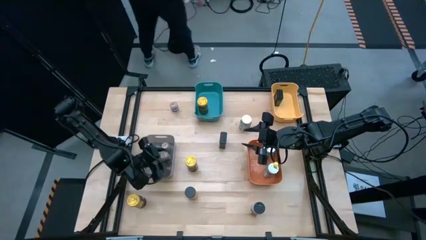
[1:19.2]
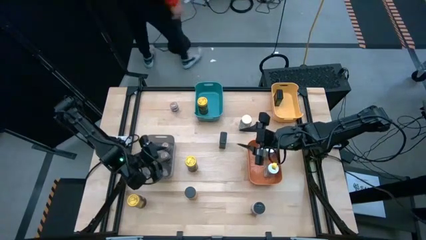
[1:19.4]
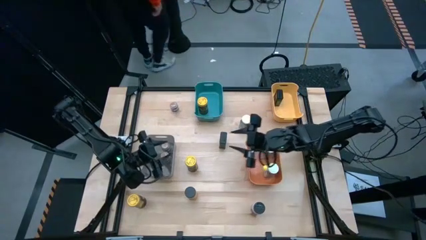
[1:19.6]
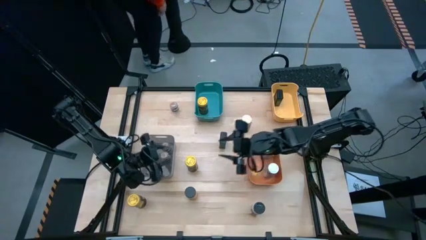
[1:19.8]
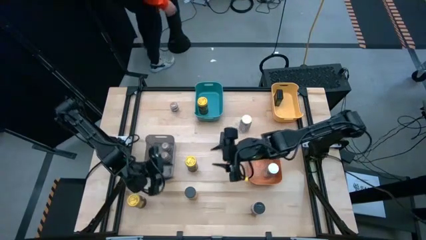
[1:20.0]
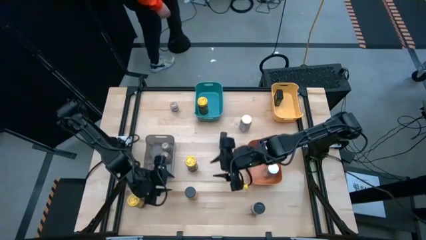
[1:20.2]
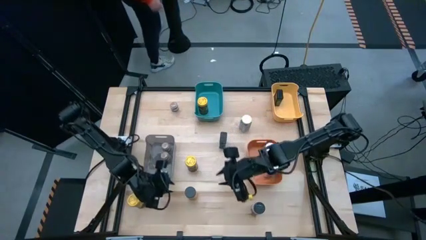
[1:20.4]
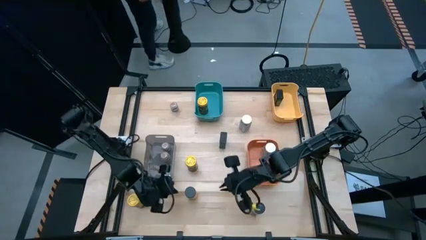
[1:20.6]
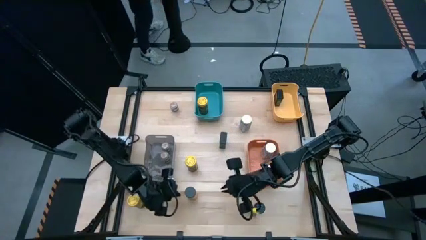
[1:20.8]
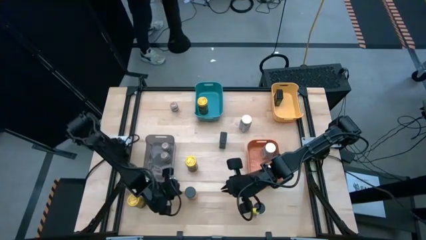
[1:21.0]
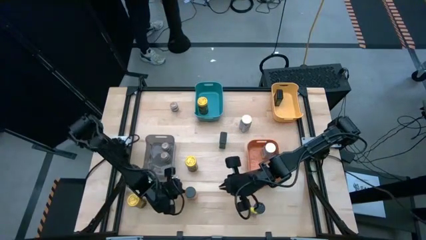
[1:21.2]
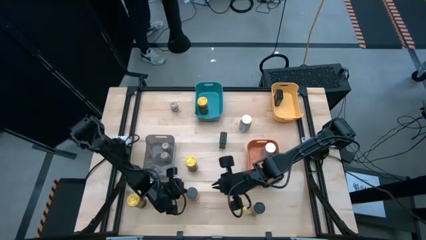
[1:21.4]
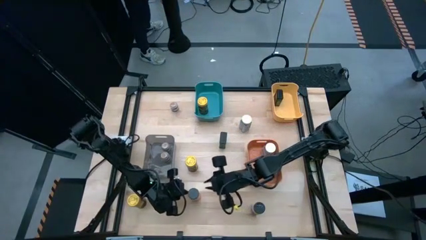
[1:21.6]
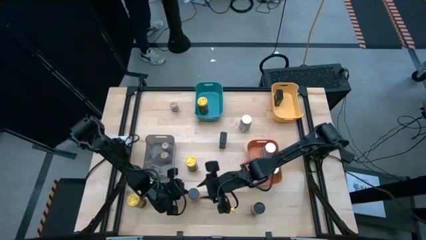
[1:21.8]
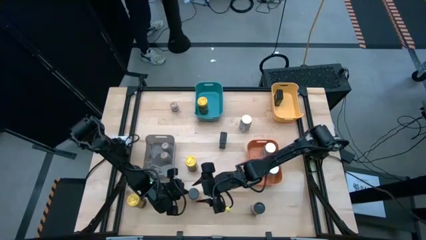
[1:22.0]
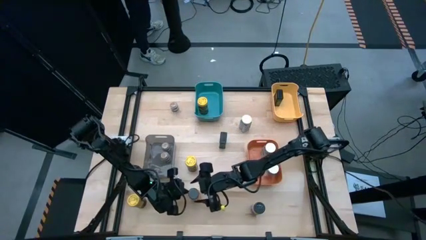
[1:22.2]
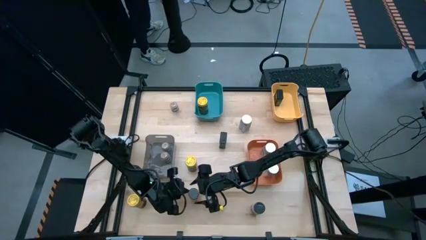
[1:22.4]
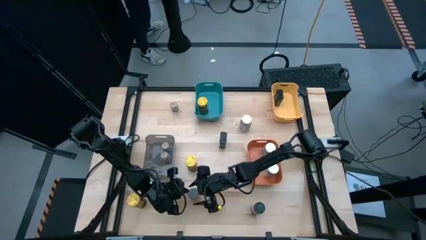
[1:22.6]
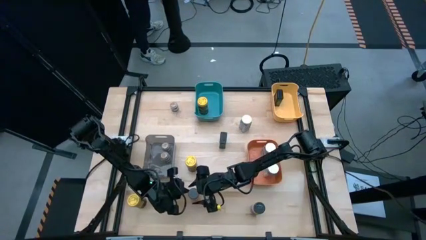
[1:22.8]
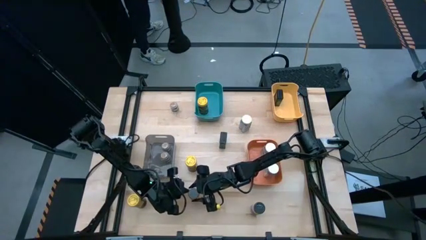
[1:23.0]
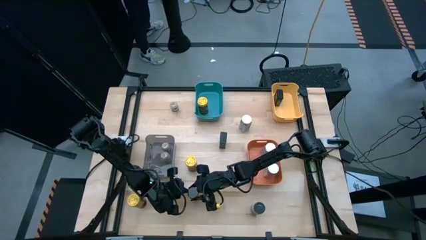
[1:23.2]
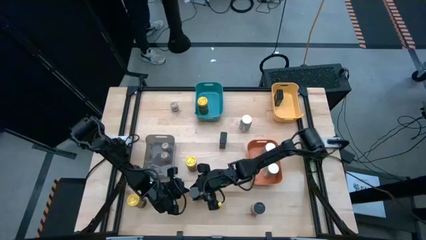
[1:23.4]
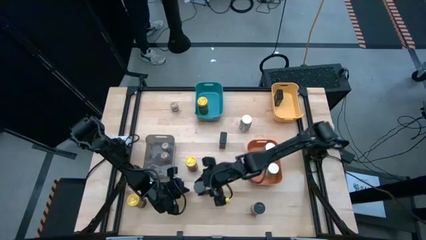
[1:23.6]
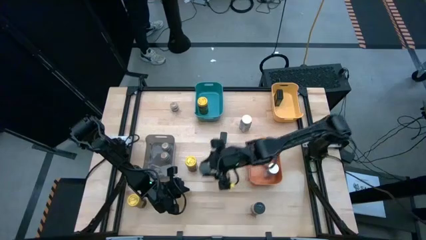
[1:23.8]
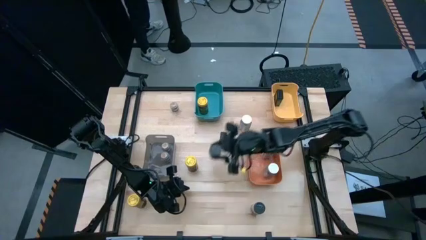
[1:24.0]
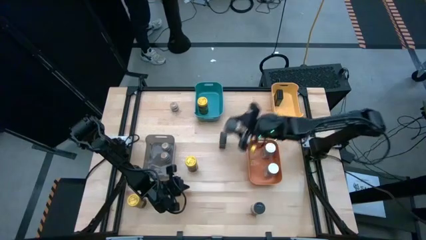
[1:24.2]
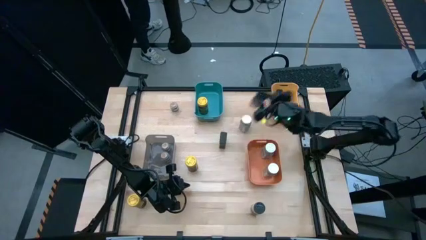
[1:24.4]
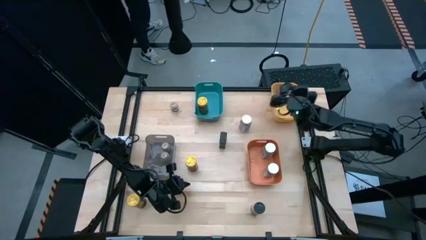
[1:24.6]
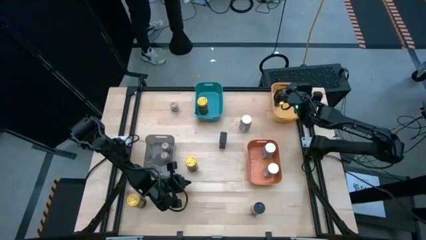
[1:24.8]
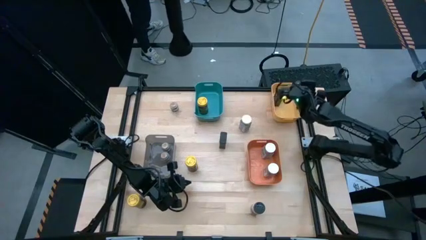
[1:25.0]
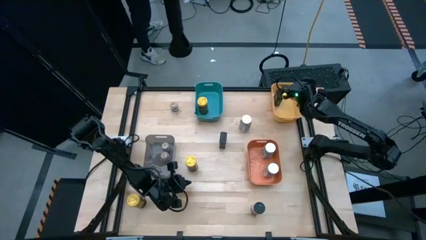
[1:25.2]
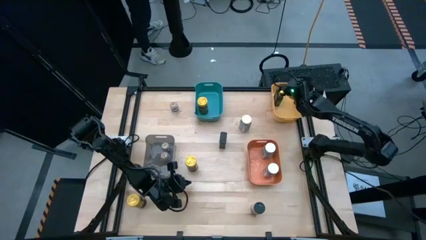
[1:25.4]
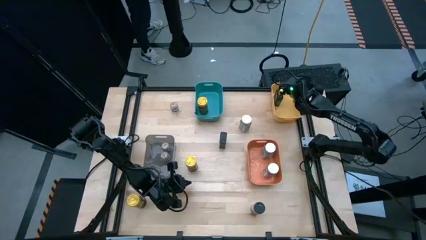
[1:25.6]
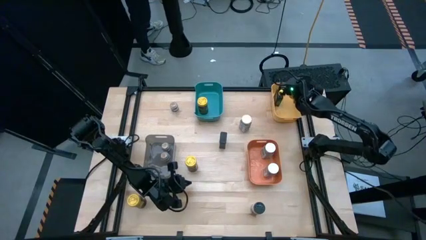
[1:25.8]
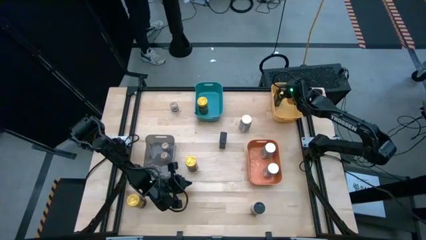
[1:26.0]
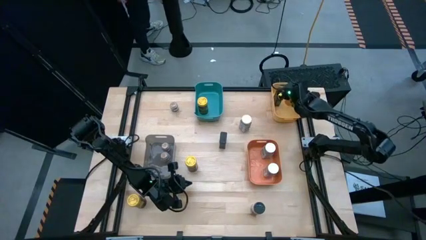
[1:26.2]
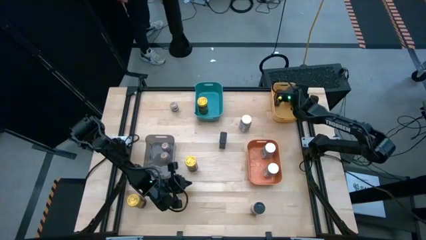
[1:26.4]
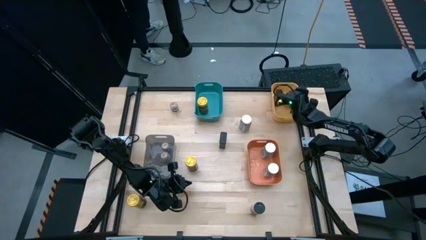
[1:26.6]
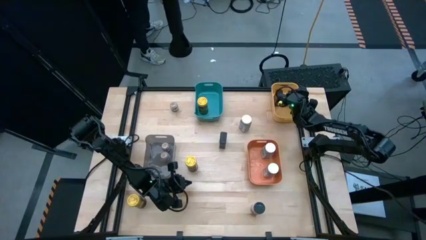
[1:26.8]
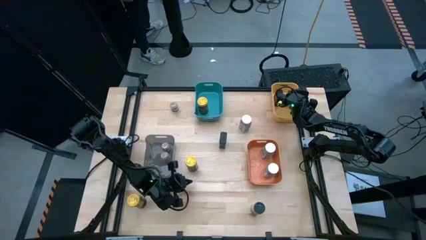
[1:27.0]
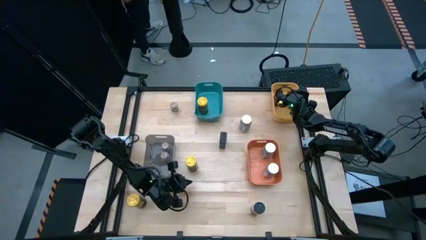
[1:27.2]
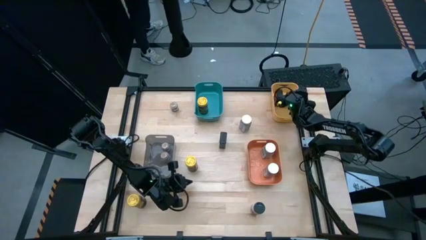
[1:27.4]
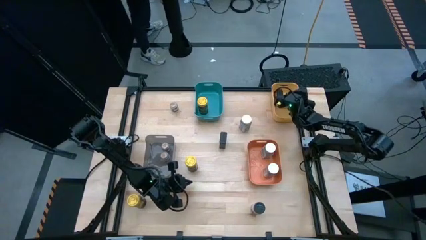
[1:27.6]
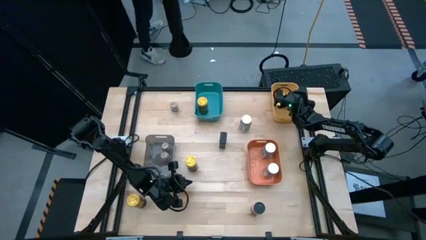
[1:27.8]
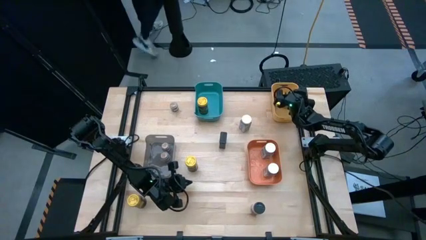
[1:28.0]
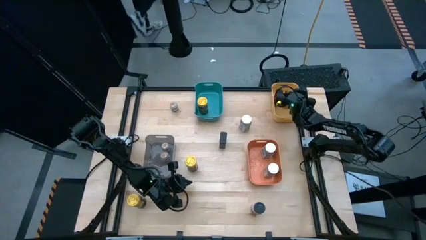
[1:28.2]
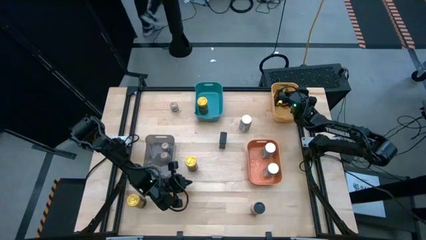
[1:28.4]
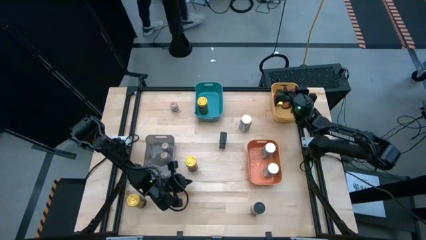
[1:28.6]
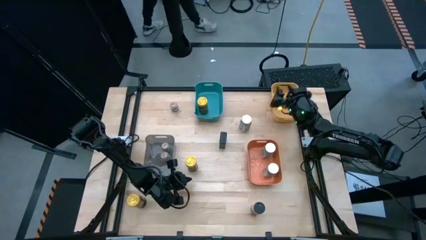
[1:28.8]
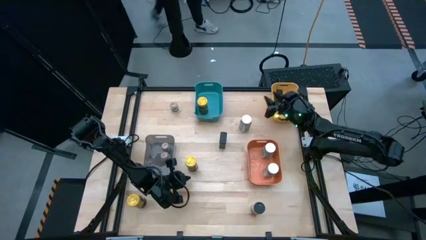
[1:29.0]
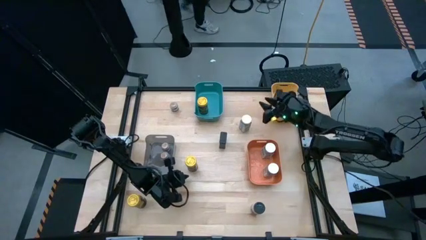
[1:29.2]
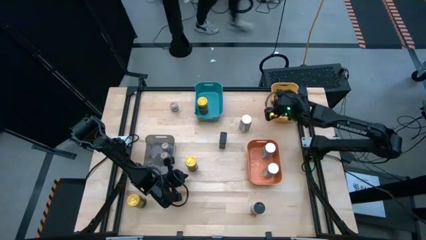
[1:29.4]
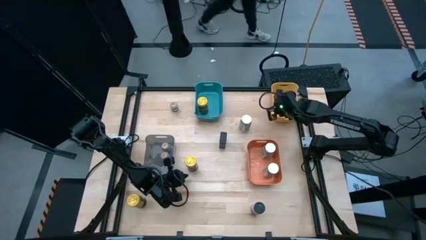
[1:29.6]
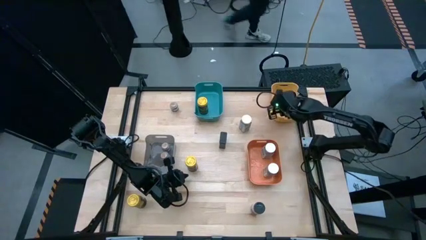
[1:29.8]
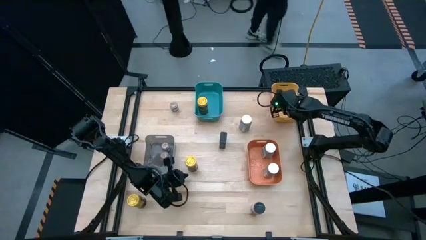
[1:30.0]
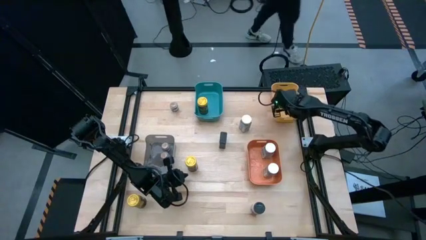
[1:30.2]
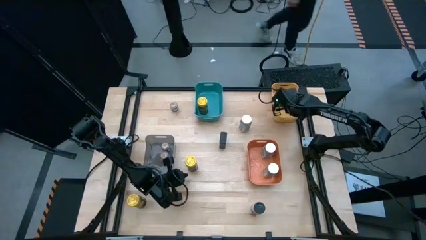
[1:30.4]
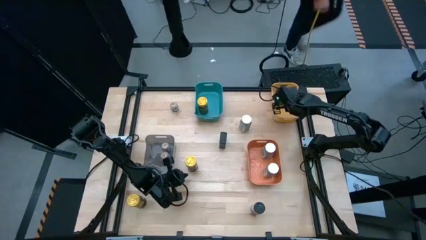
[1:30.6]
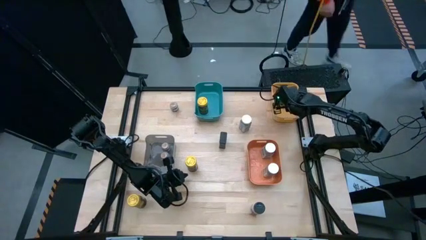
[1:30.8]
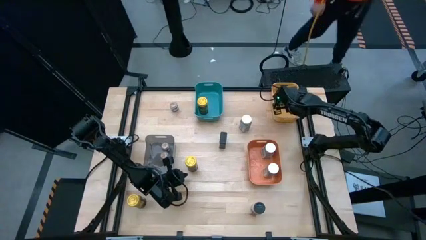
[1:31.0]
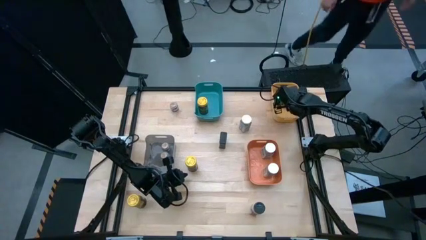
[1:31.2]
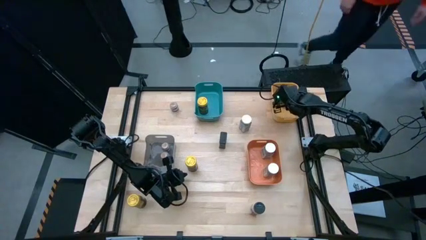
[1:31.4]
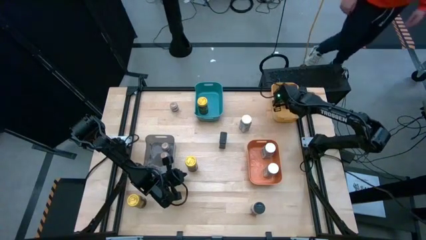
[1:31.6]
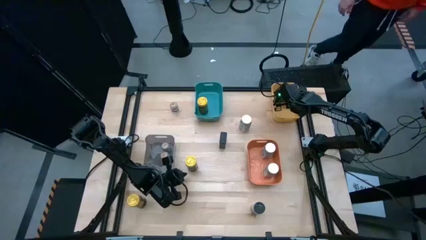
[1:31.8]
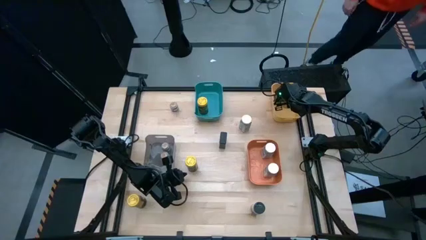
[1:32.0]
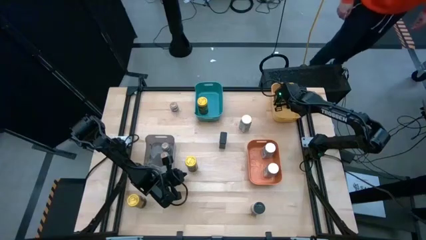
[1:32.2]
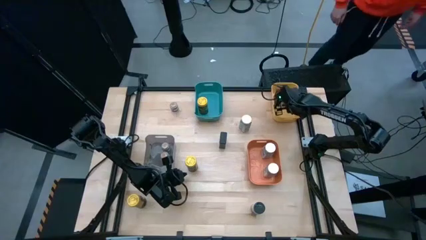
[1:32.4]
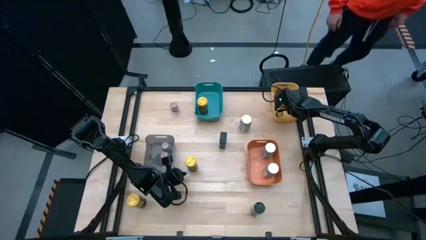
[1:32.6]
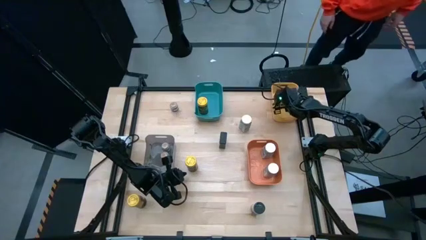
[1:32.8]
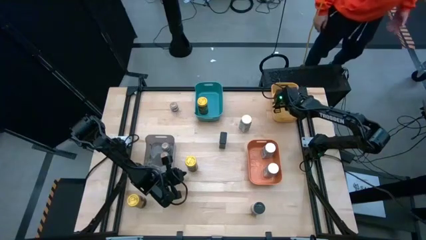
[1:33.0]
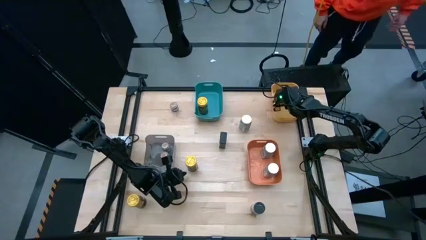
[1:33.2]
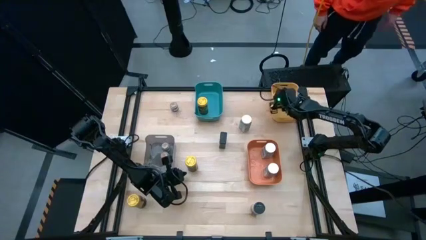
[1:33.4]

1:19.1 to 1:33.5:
Task: Sort spices by type
Put the left black seasoning bottle into the yellow bin

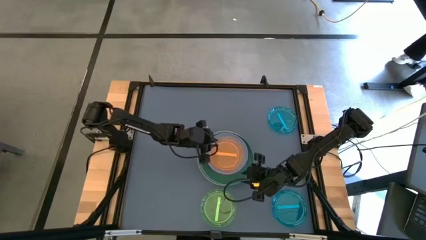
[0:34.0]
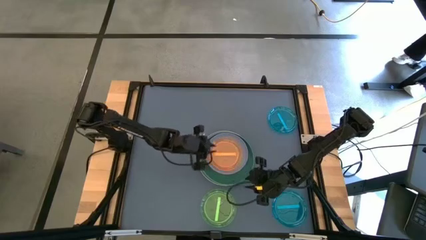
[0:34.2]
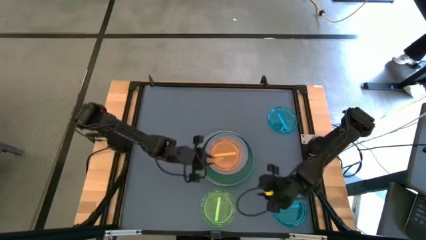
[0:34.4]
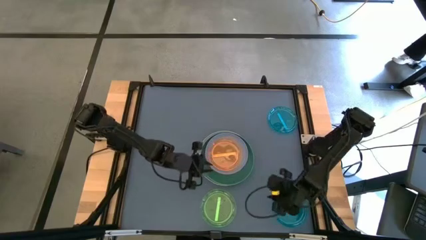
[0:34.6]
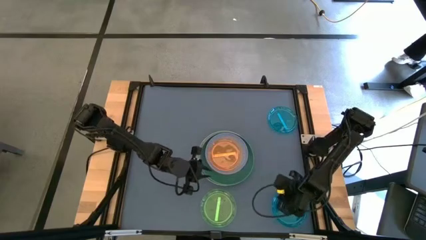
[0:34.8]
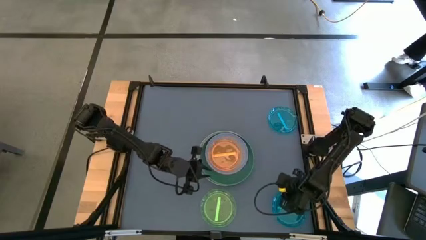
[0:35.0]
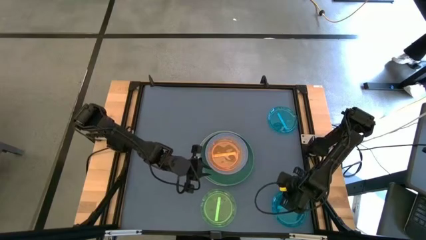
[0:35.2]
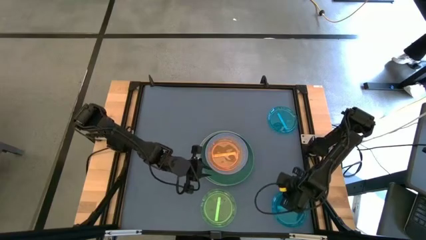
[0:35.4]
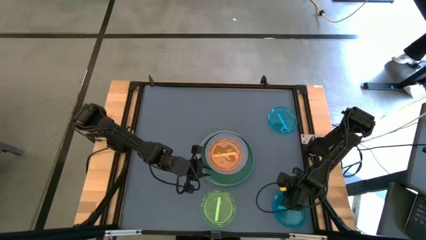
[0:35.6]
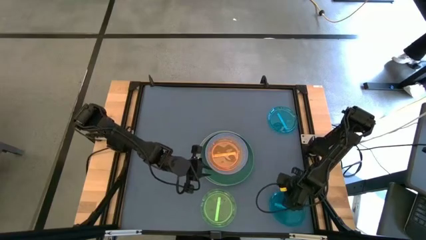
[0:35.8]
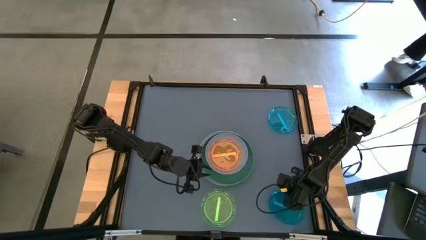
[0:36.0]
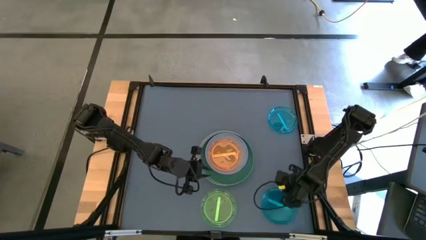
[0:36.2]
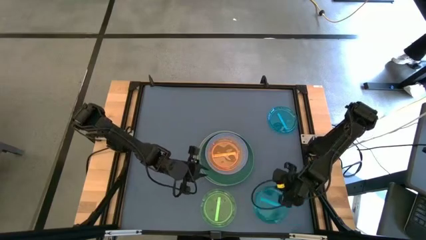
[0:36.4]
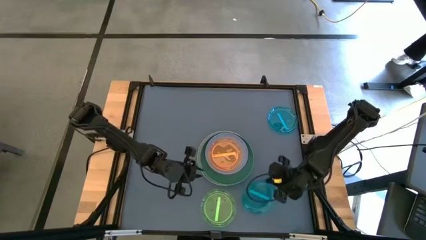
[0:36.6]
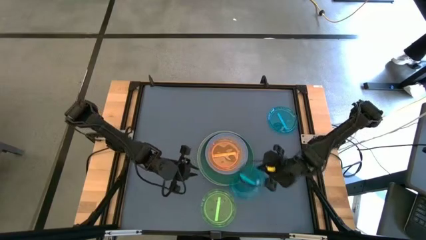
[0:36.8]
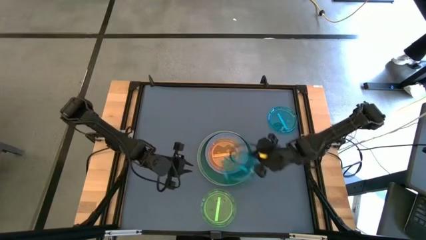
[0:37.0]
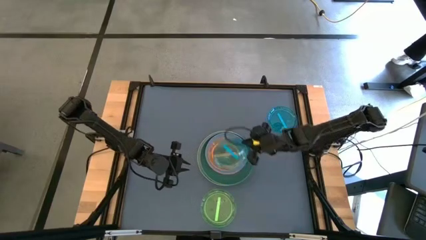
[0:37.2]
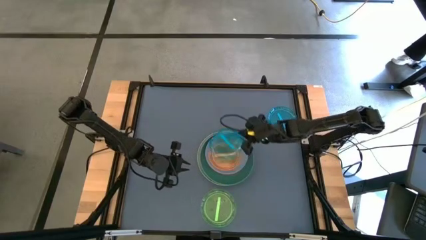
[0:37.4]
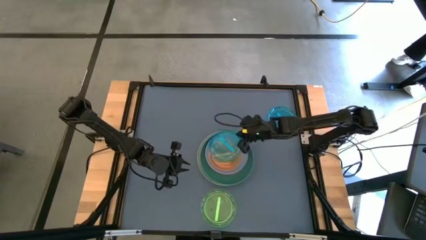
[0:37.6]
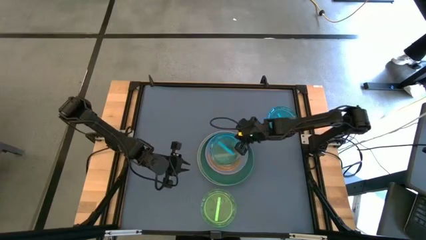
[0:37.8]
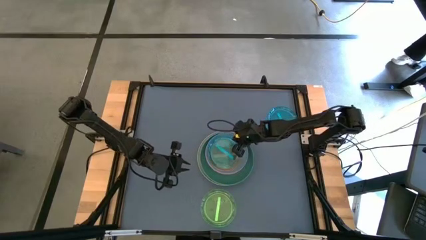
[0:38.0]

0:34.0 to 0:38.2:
Task: Stack plastic plates
Stack the bottom light blue plate on top of the orange plate
